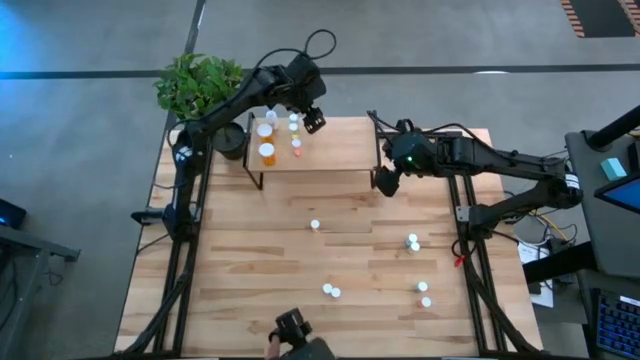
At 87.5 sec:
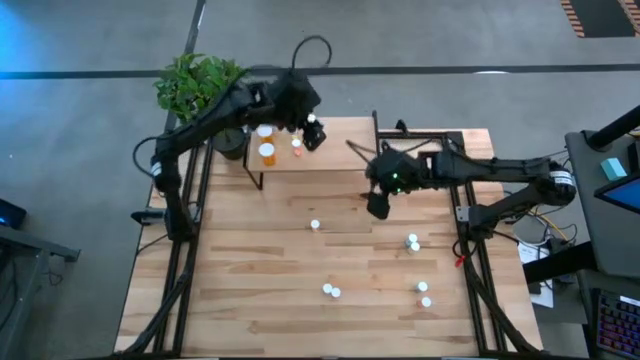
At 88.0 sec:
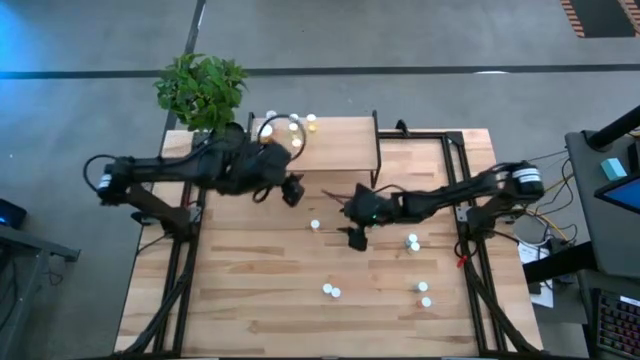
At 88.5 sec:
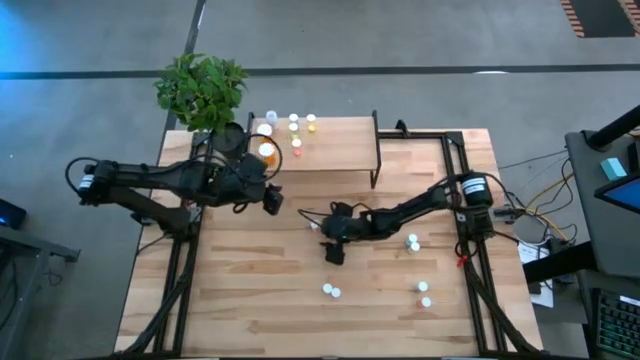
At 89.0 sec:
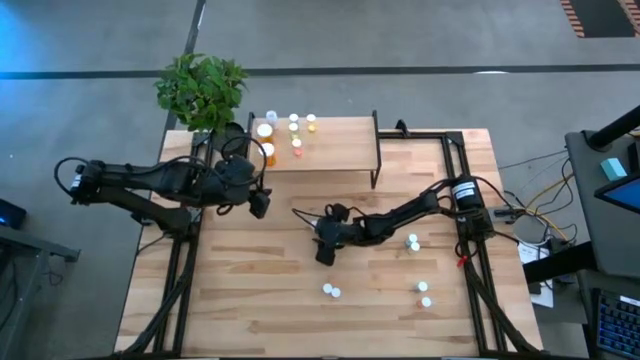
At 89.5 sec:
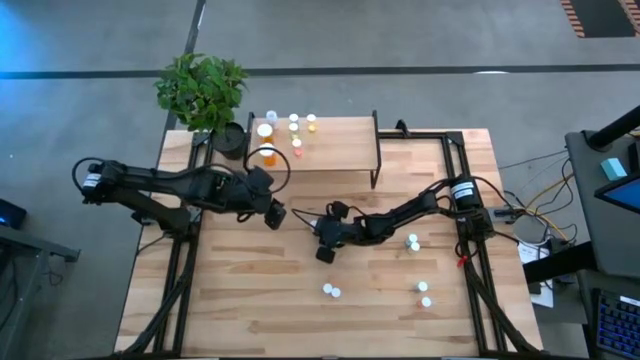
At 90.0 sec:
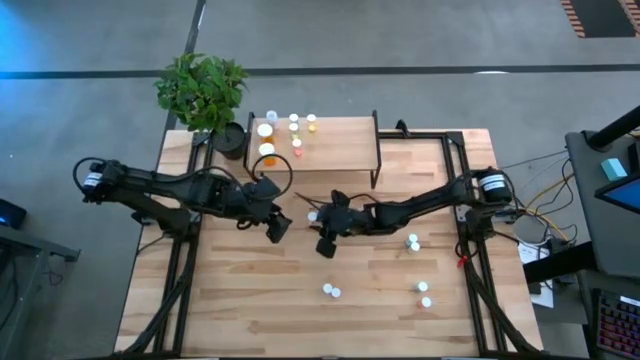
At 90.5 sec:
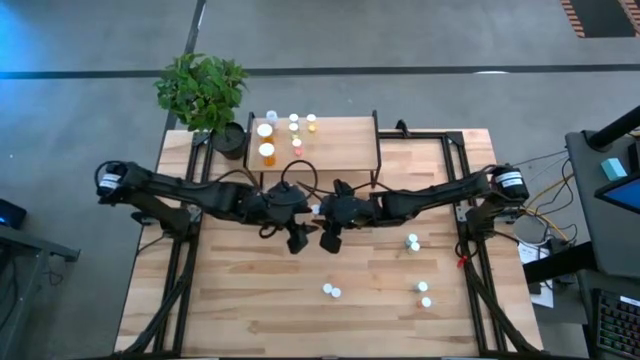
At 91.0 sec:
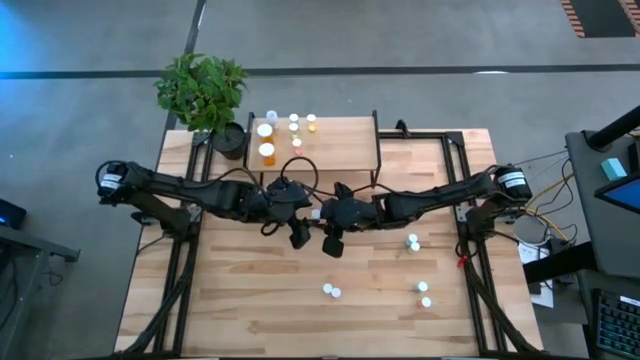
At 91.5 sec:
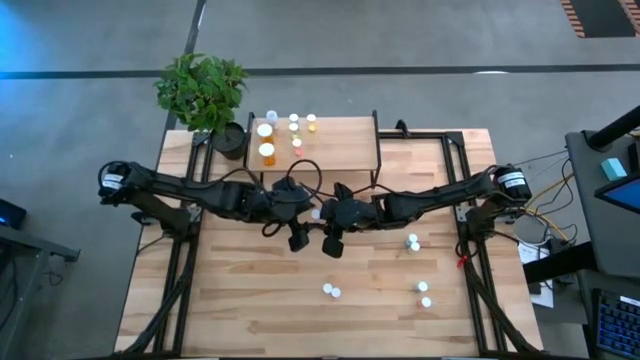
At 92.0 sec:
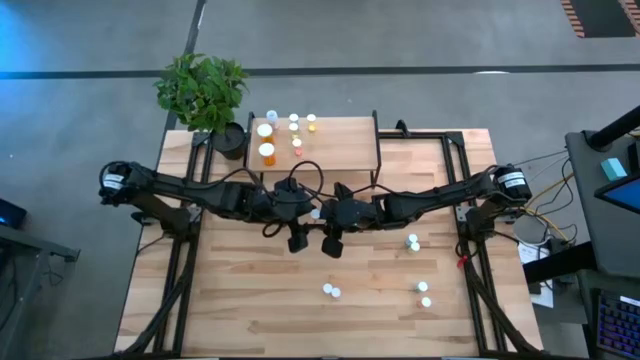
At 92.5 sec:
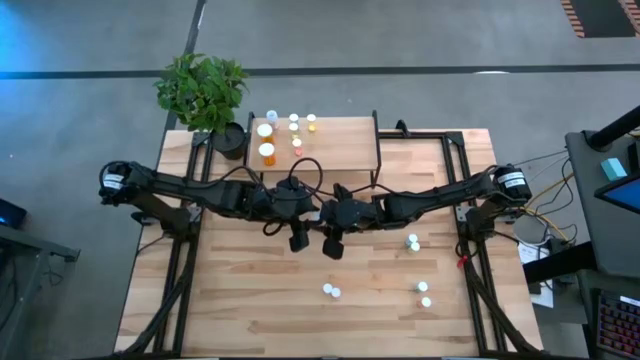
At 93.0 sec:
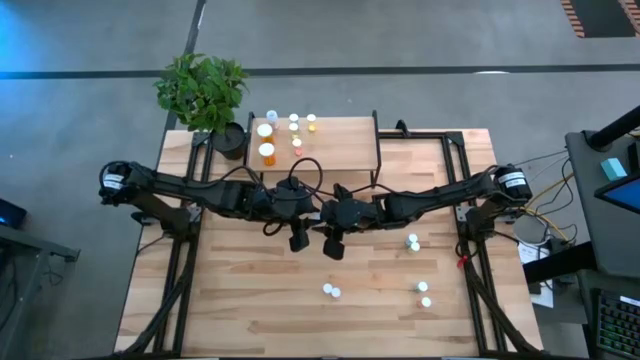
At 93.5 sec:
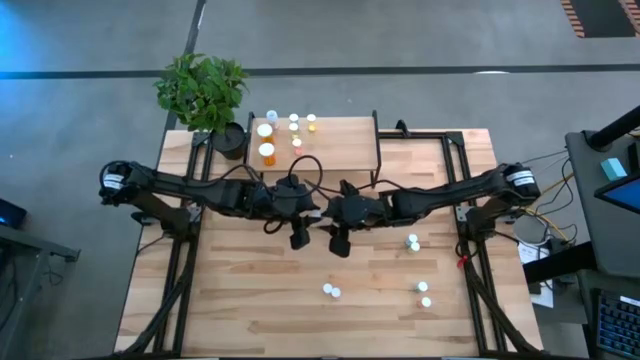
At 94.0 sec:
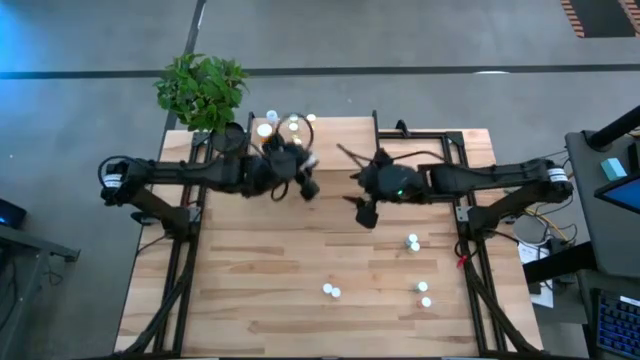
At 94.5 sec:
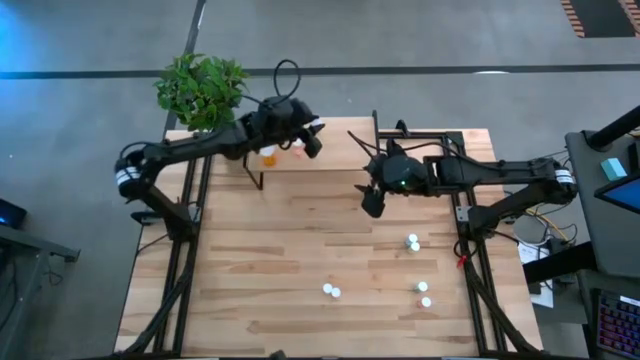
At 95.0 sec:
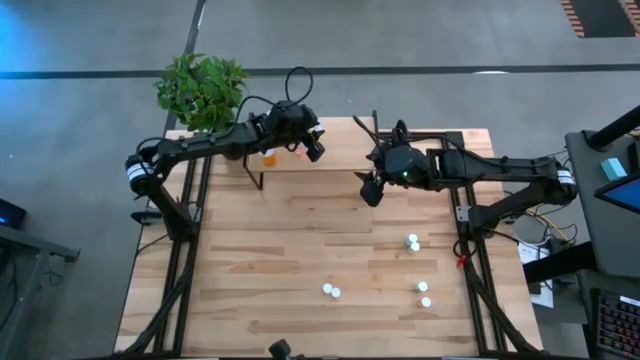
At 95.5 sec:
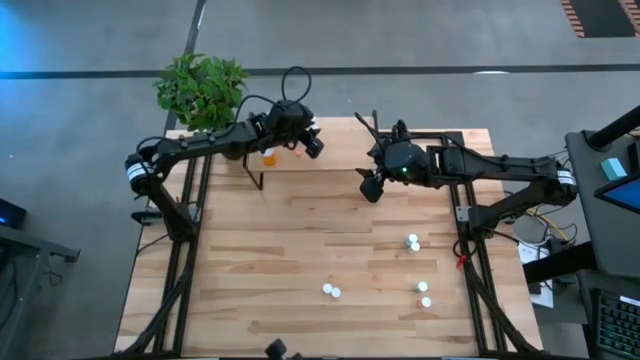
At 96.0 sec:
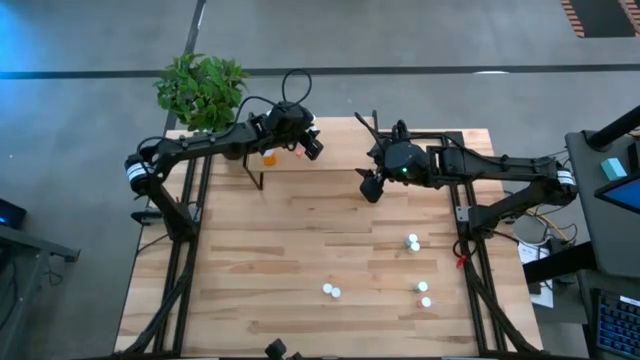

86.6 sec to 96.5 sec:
Task: Pick and place medicine bottles onto shelf by color
Put the yellow pill bottle on the shelf

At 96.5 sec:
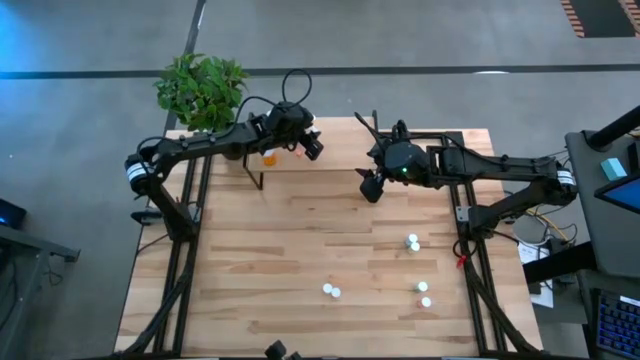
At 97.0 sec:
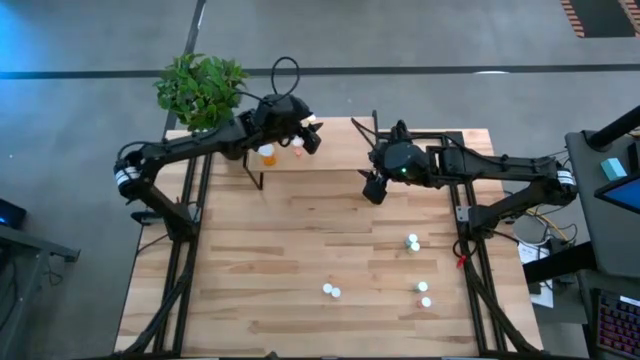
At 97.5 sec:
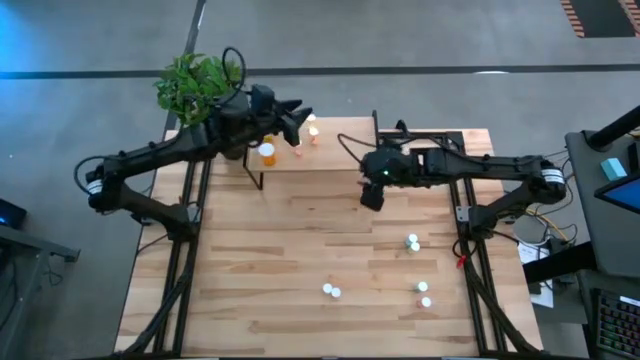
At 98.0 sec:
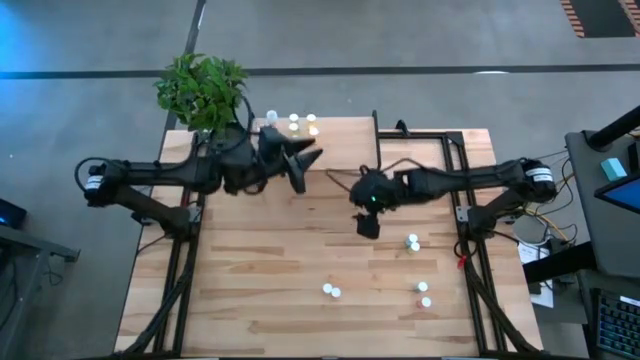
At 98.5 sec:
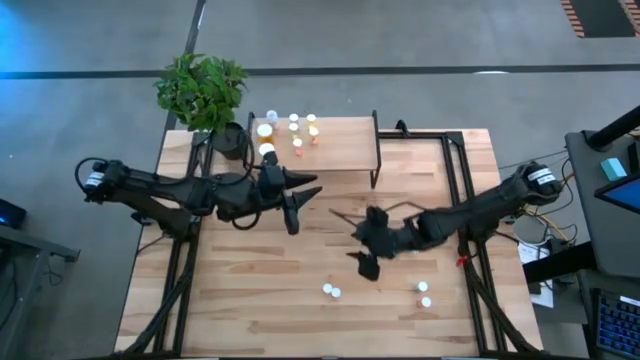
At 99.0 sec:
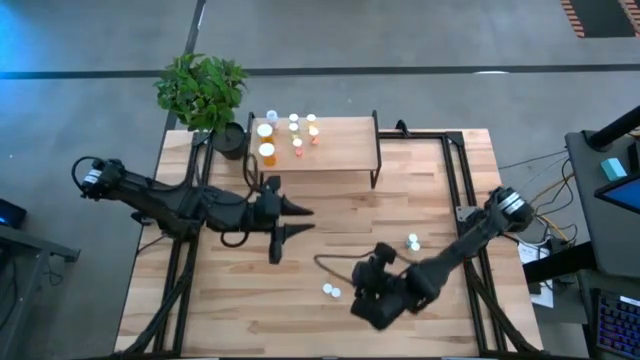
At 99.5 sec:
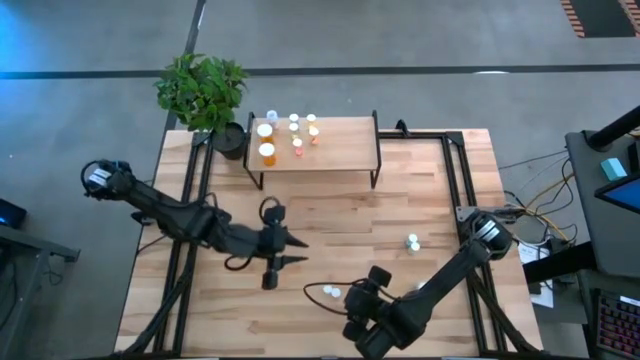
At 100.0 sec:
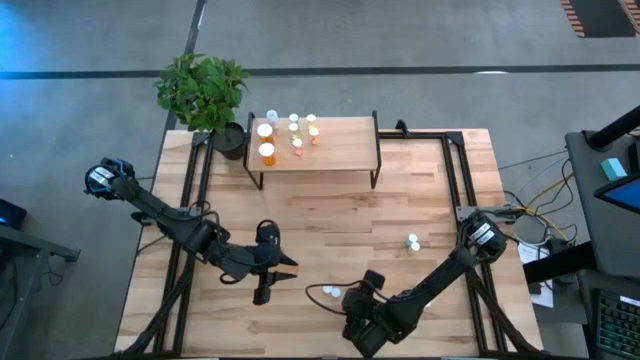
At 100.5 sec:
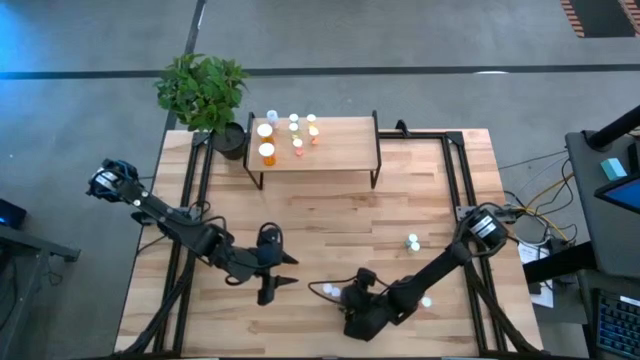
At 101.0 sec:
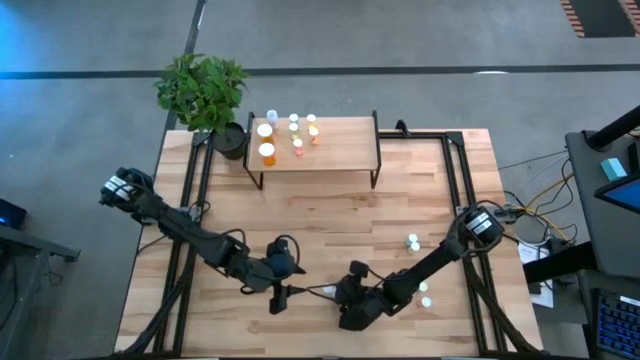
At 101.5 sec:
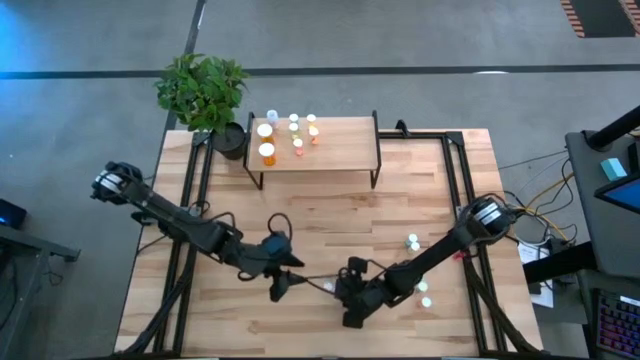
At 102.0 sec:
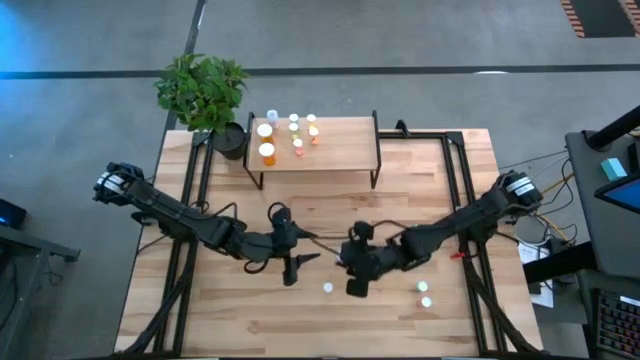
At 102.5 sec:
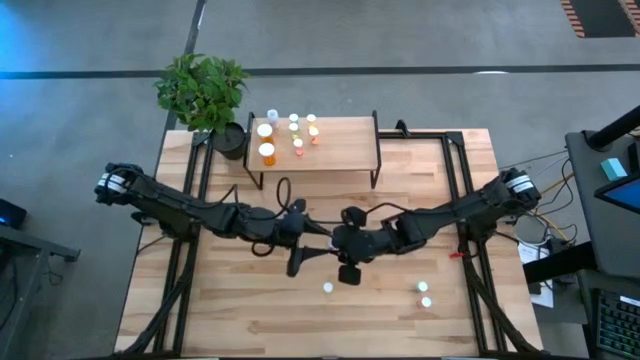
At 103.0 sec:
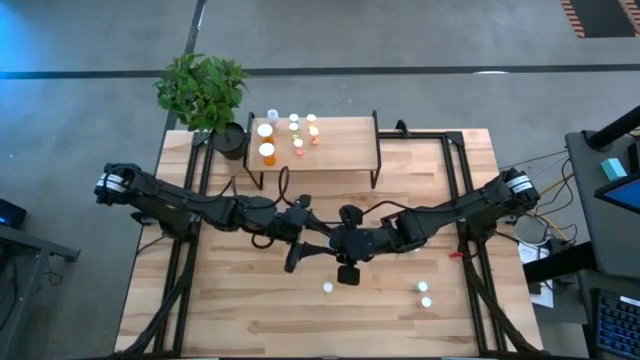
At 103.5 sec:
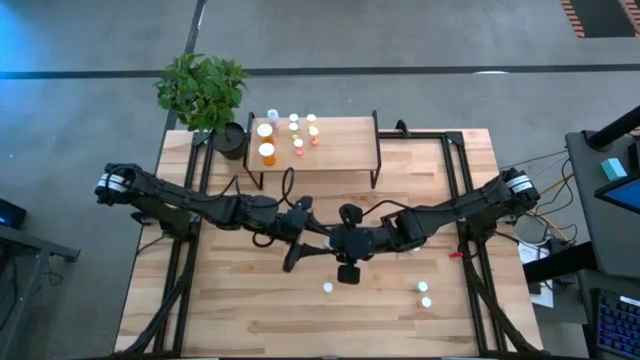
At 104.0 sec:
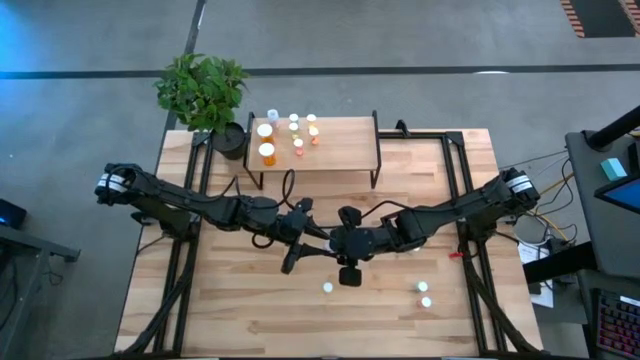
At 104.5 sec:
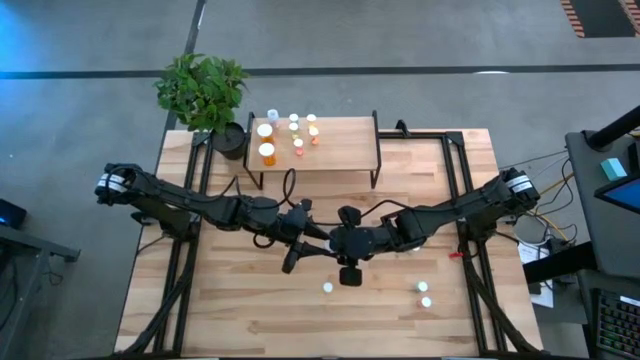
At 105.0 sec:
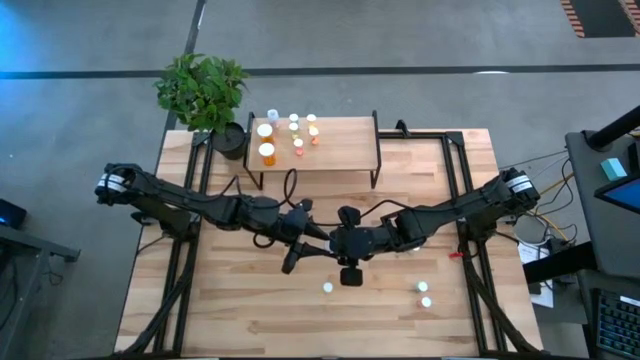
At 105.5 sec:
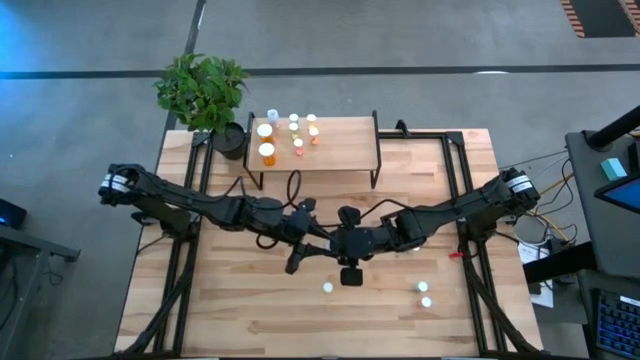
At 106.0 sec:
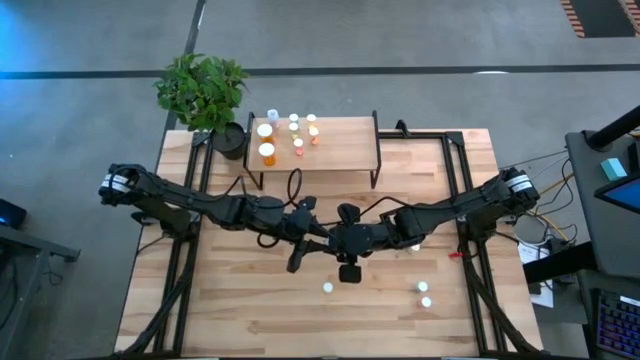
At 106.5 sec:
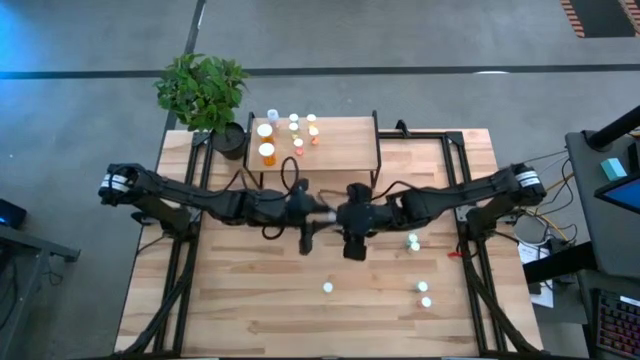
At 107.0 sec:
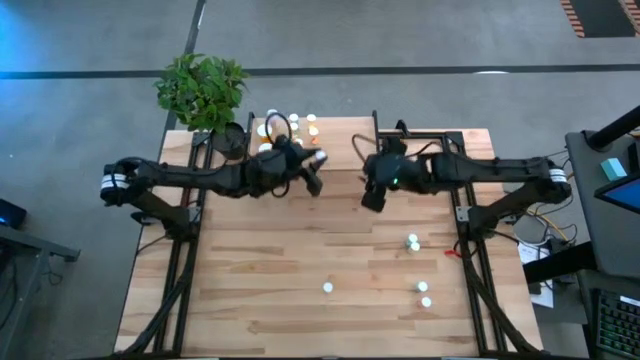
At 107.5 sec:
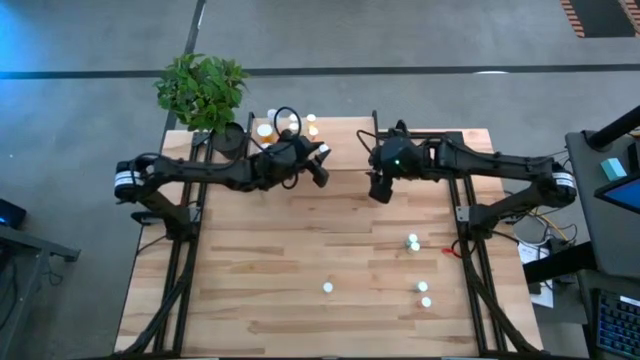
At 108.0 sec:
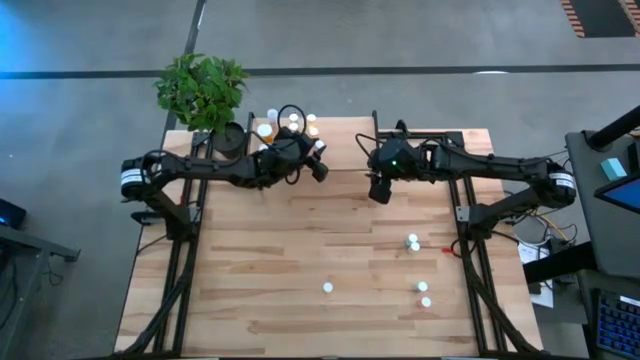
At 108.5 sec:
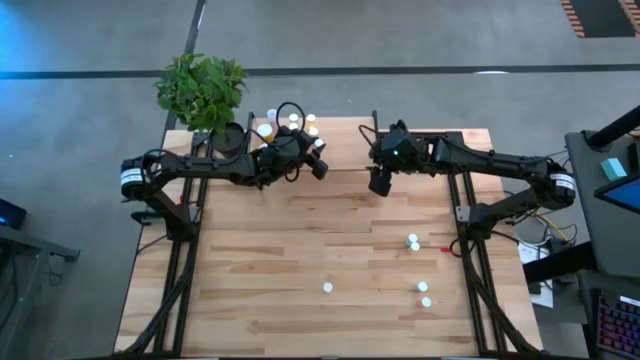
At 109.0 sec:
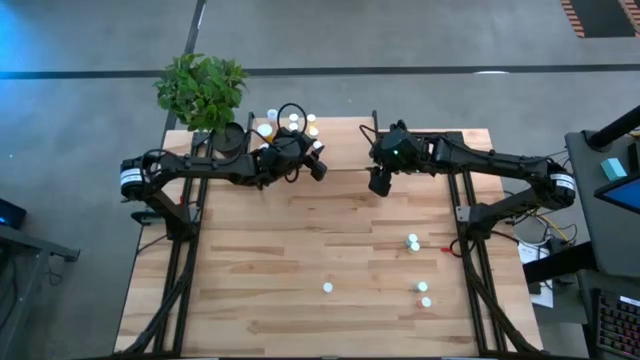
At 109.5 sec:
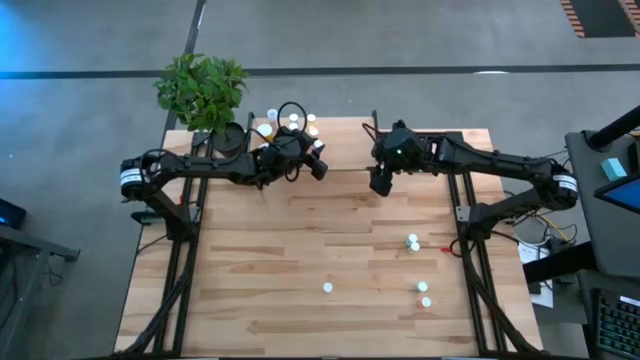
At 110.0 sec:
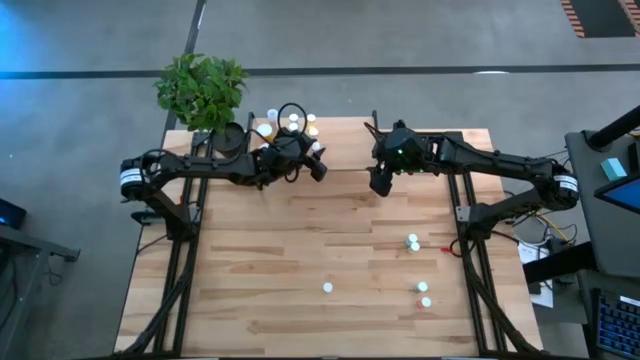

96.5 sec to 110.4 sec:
Put the pink pill bottle on the shelf
